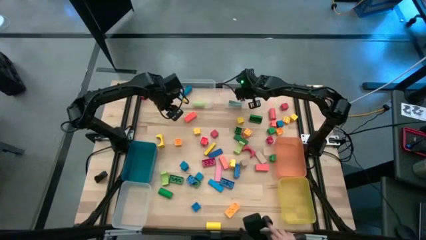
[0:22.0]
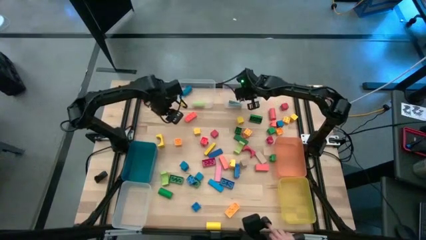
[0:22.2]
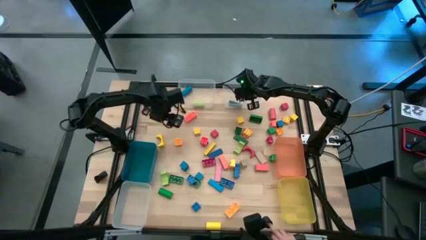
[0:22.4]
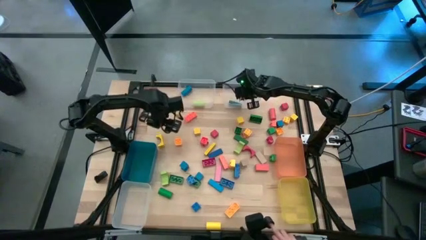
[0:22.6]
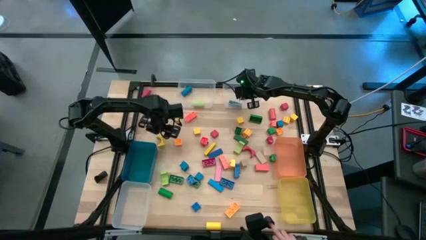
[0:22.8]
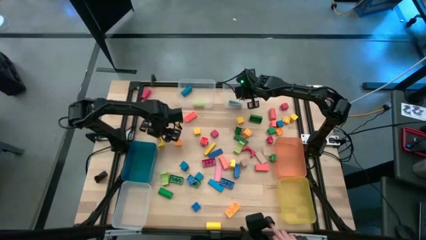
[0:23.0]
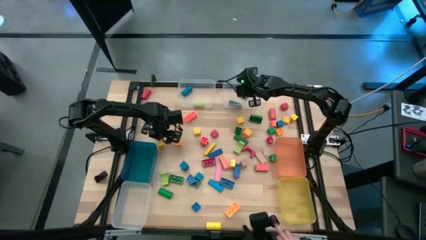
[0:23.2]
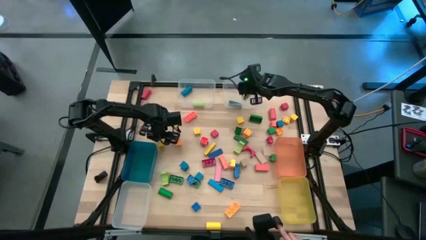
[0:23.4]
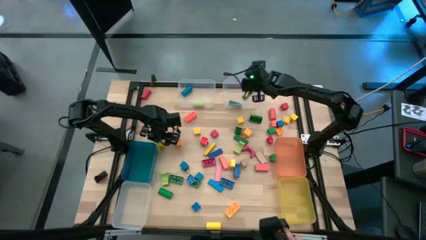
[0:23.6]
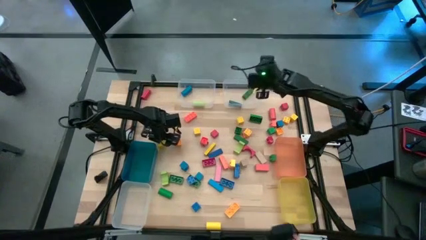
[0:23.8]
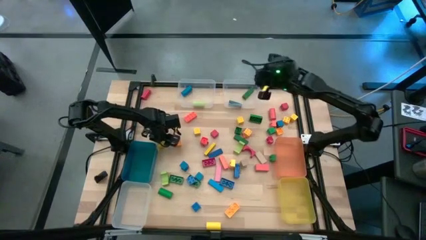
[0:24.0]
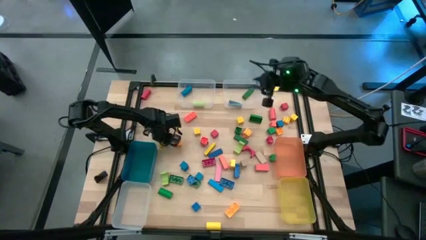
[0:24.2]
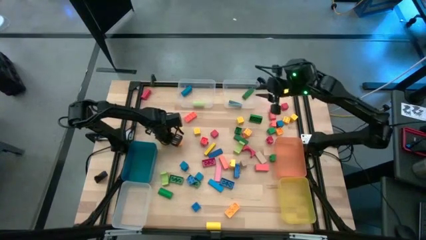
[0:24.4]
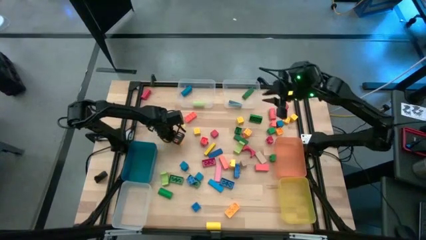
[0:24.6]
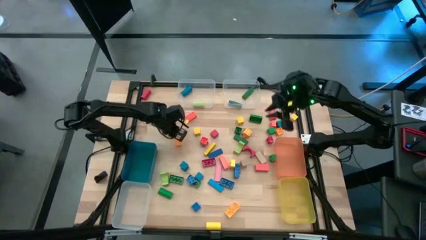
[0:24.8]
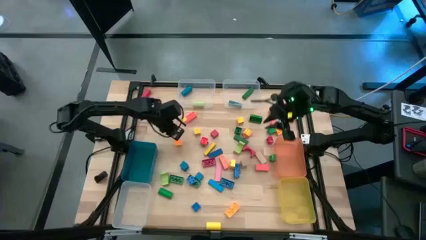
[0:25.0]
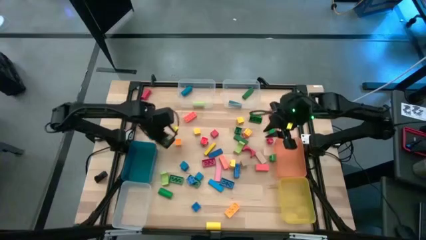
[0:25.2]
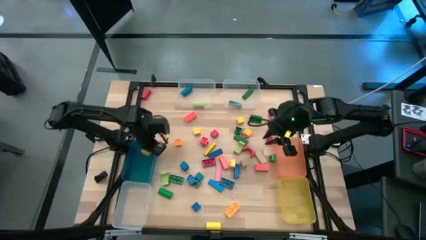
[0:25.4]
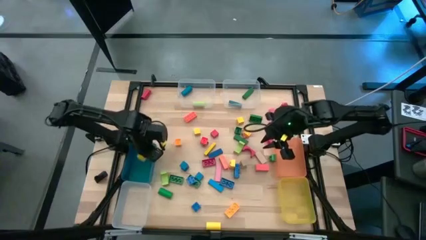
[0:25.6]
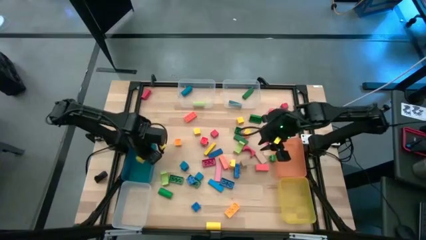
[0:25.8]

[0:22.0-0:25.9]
Task: Sort blocks by size
Put the yellow block into the blue bin

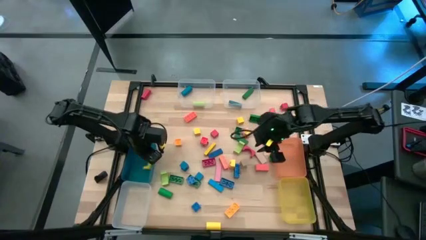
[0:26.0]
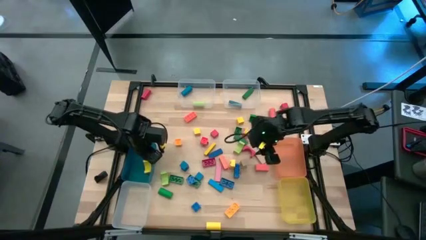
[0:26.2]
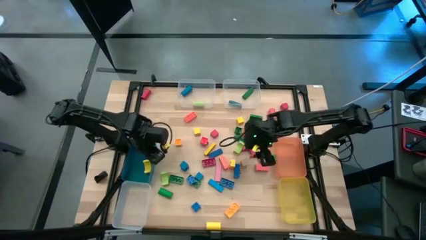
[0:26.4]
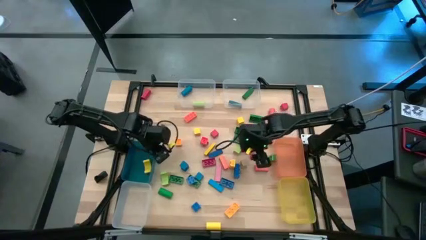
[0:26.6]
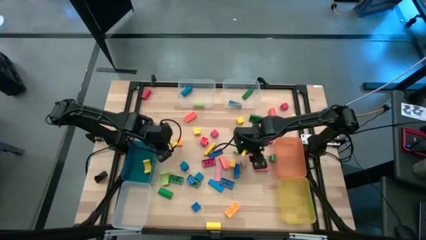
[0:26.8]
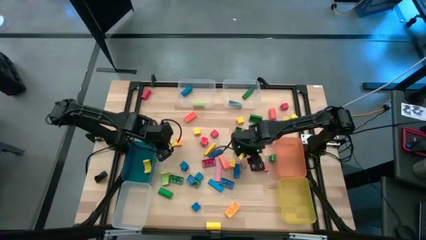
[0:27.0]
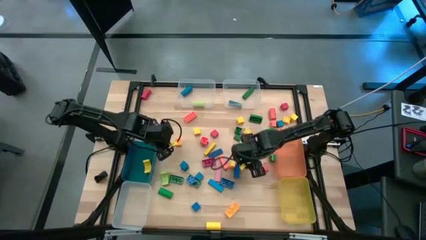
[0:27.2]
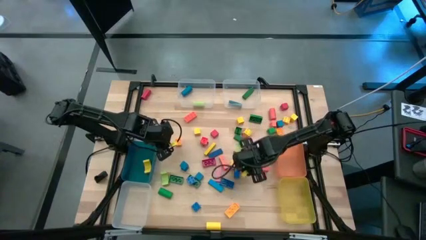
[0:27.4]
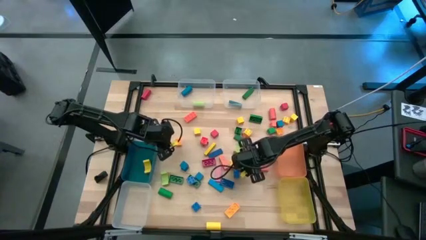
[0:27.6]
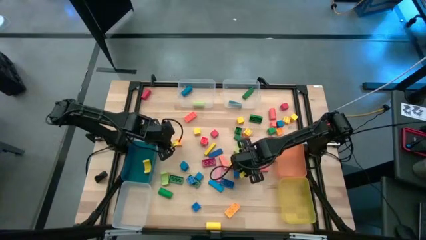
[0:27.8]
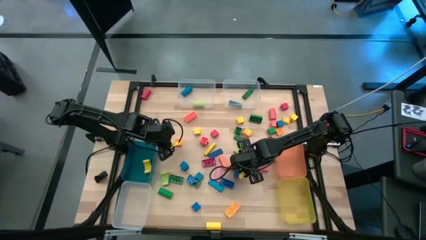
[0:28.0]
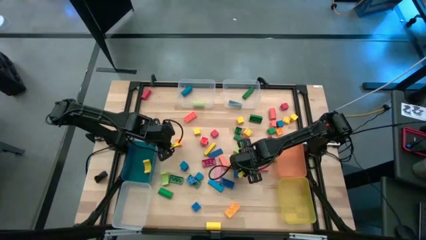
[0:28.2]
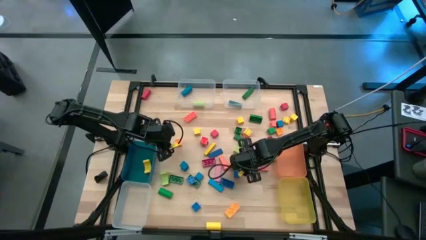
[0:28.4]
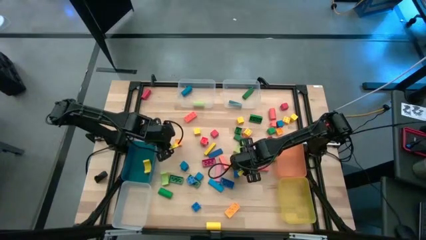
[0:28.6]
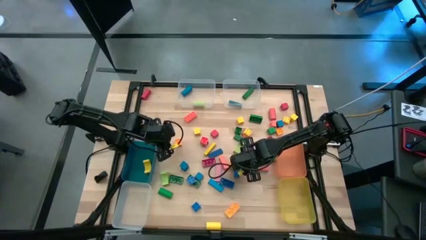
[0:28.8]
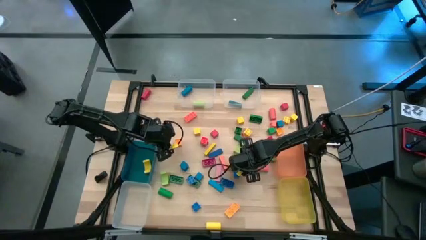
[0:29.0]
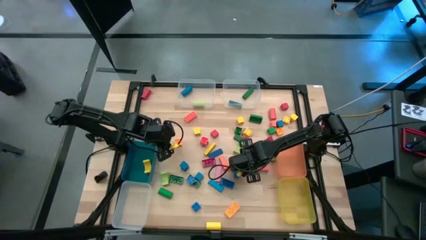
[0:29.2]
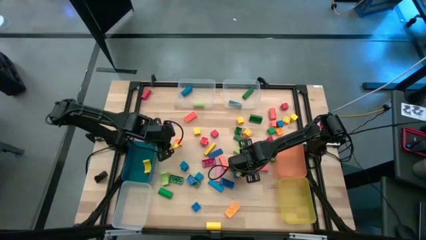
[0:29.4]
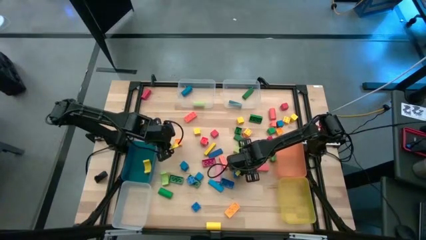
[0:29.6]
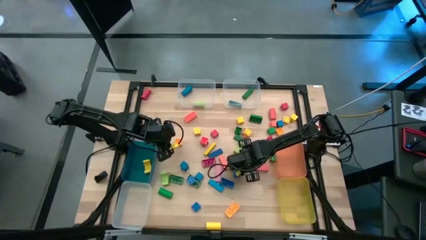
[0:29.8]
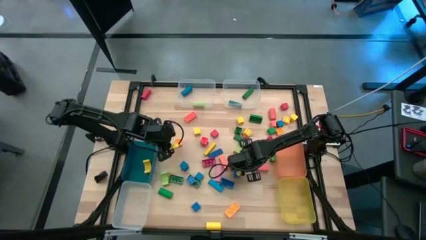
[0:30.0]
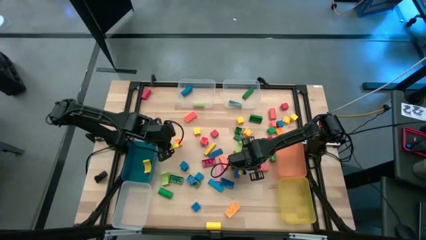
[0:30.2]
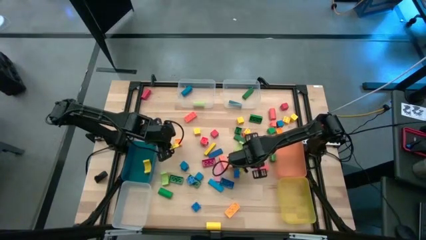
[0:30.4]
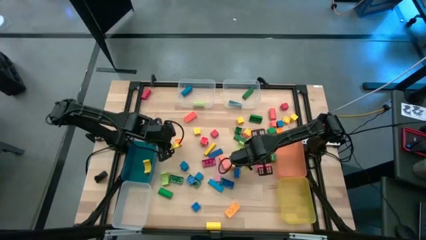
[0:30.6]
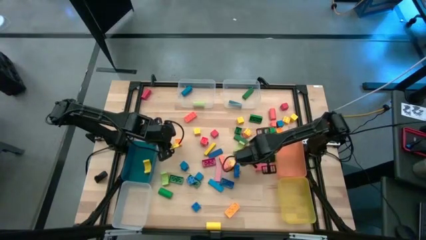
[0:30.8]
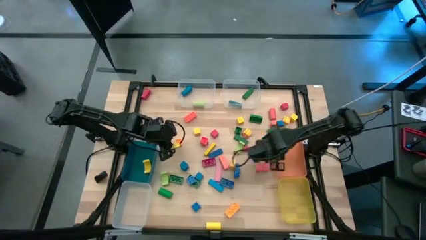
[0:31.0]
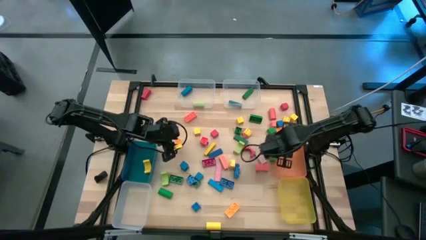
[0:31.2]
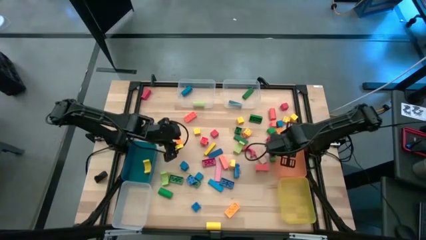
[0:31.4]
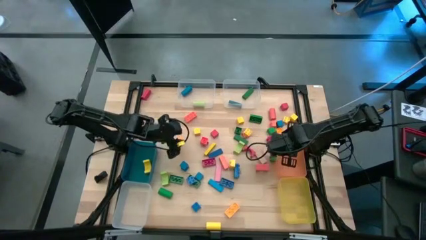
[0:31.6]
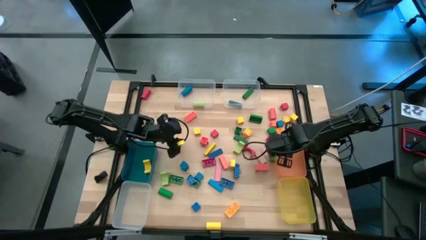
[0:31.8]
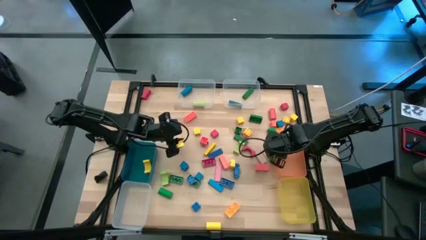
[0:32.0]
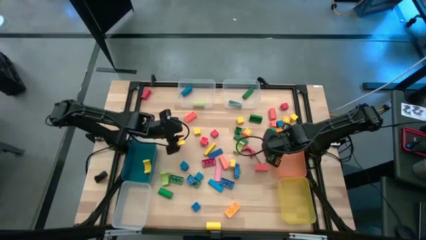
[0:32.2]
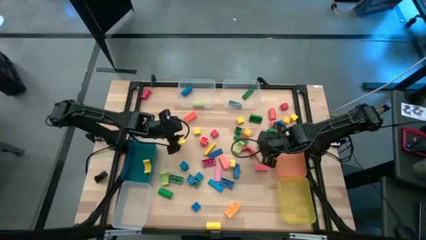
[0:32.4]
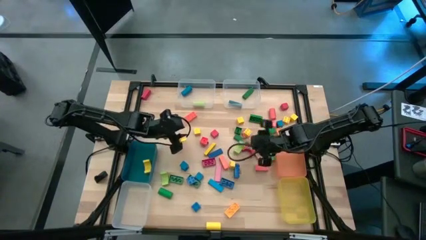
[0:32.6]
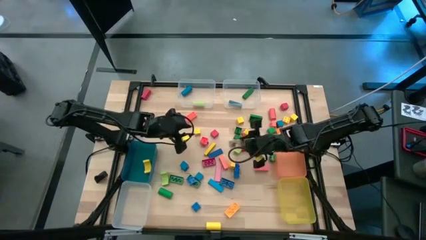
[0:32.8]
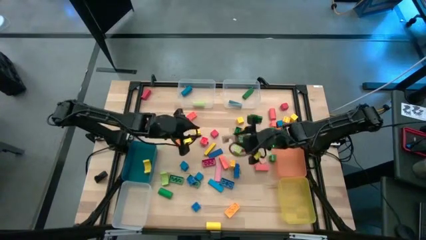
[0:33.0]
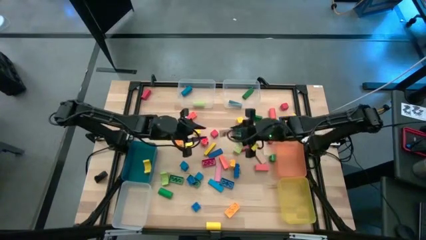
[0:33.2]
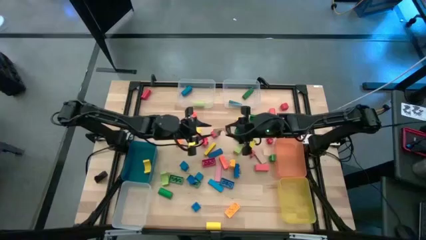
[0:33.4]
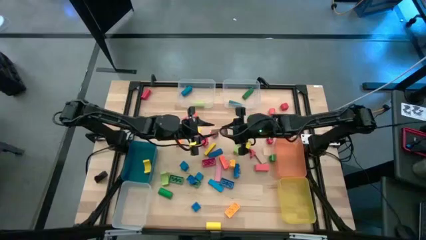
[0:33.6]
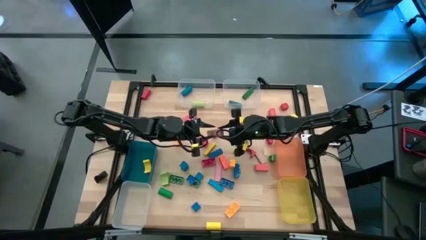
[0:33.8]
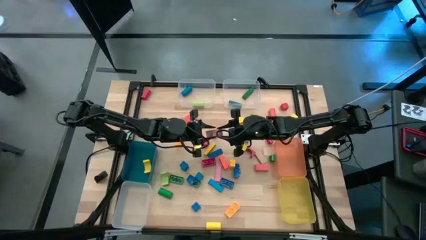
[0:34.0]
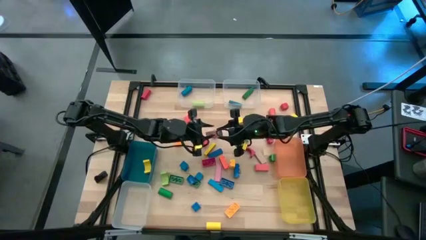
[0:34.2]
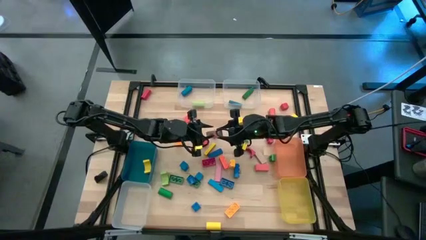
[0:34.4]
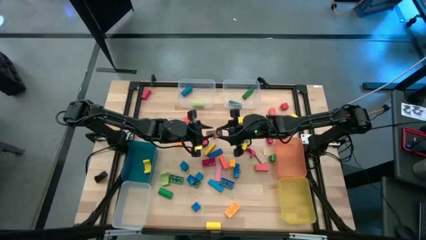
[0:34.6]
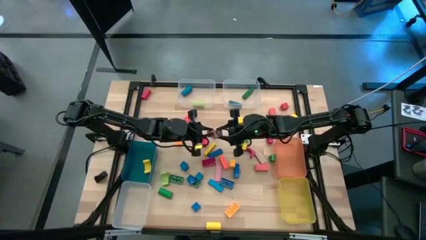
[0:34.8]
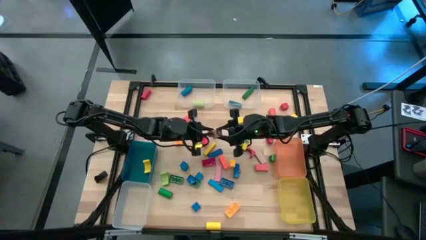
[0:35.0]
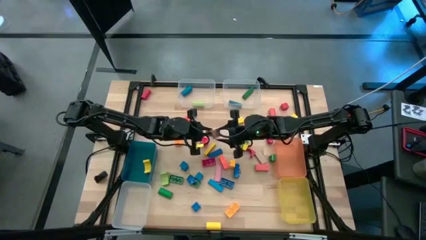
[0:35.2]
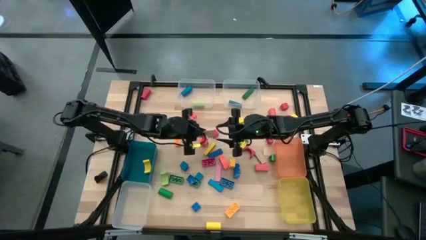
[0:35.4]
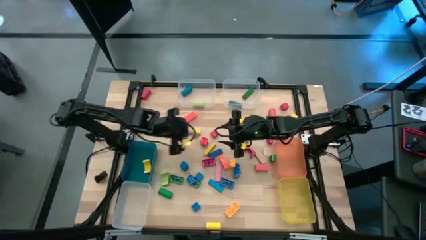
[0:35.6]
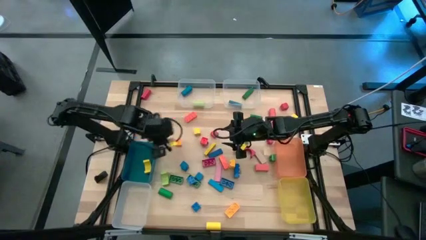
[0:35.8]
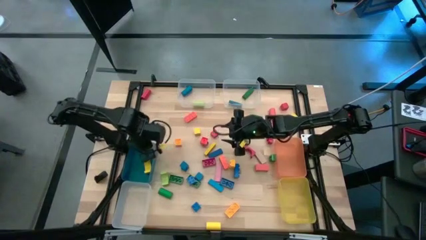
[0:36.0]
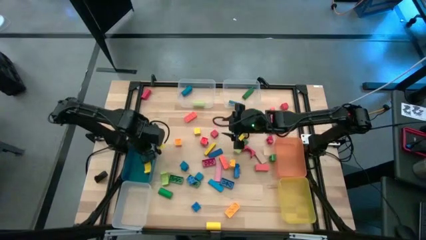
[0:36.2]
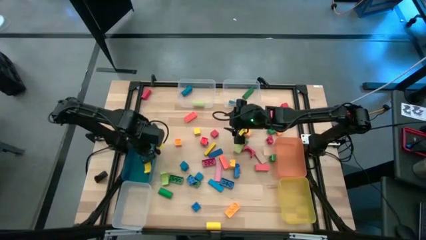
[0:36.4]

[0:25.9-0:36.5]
Put the brown block into the blue bin
